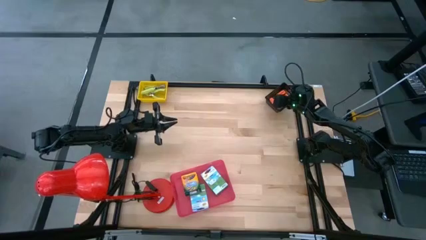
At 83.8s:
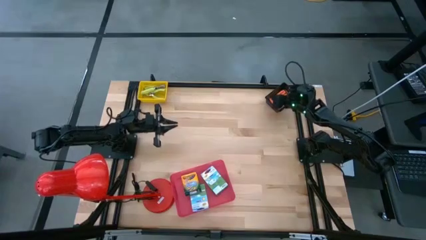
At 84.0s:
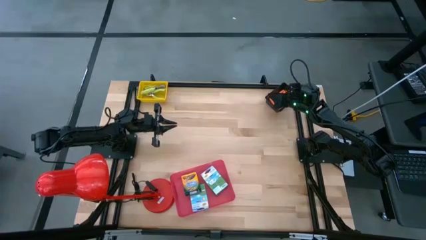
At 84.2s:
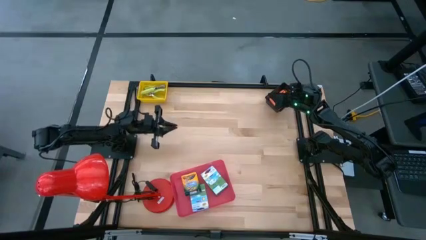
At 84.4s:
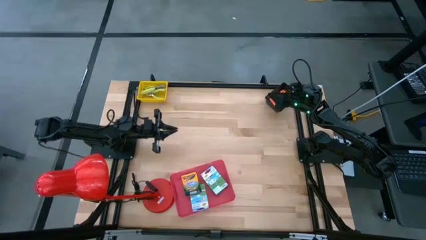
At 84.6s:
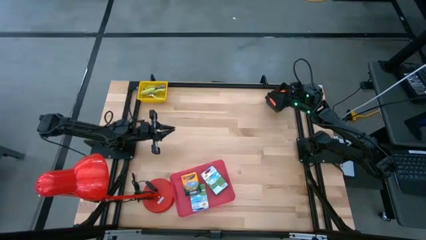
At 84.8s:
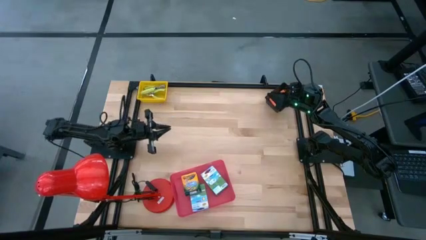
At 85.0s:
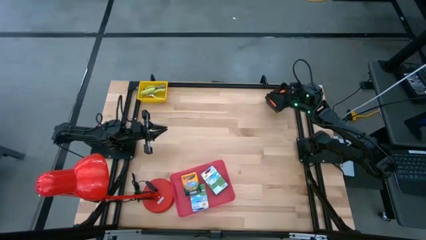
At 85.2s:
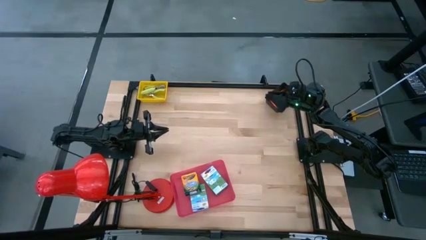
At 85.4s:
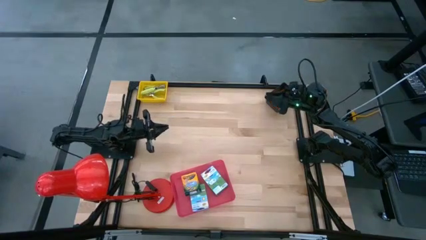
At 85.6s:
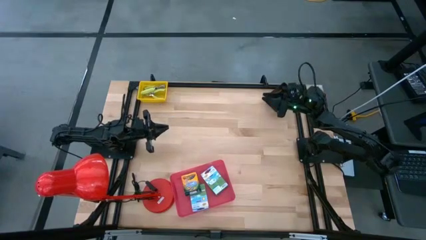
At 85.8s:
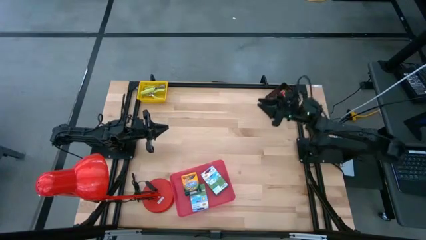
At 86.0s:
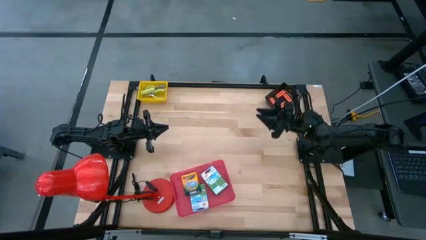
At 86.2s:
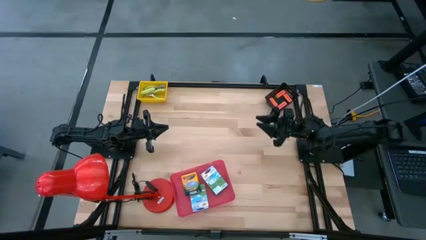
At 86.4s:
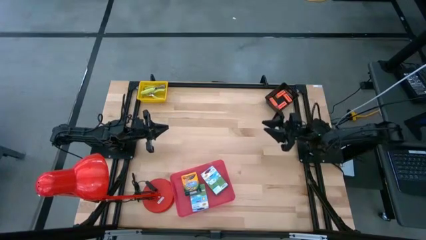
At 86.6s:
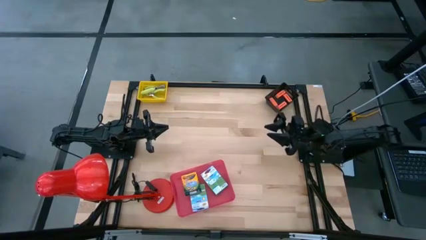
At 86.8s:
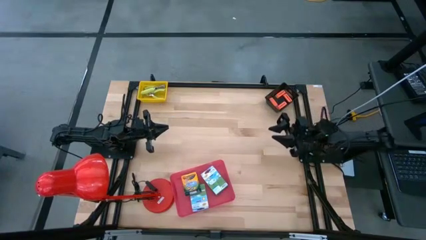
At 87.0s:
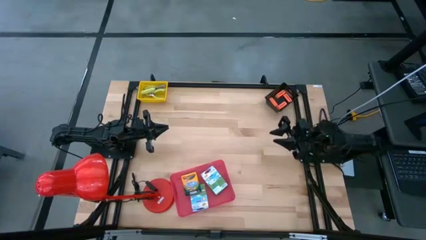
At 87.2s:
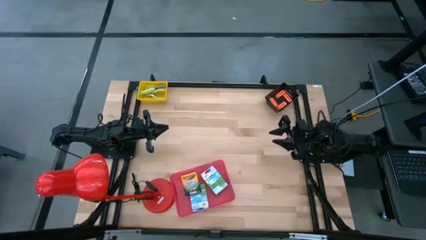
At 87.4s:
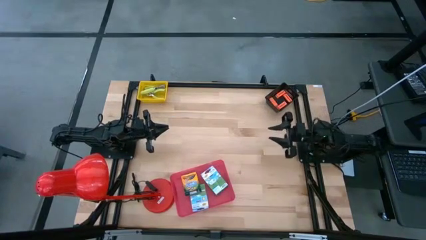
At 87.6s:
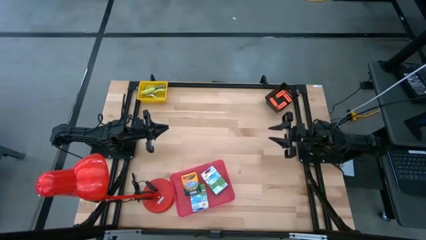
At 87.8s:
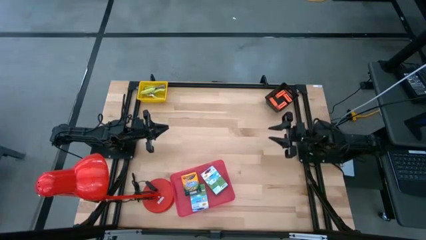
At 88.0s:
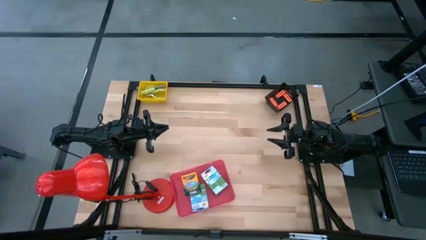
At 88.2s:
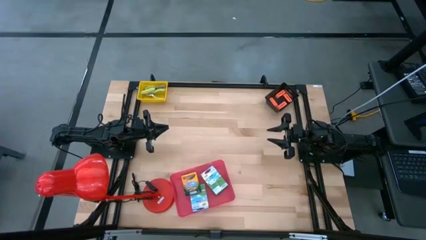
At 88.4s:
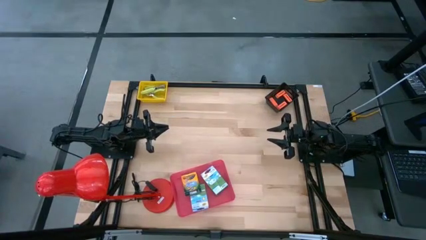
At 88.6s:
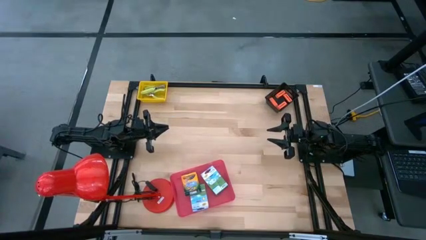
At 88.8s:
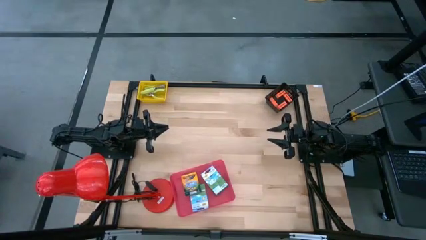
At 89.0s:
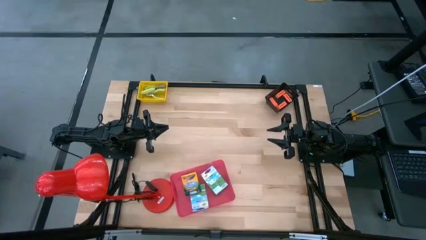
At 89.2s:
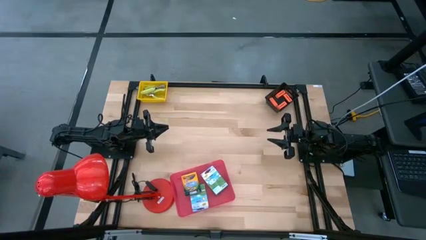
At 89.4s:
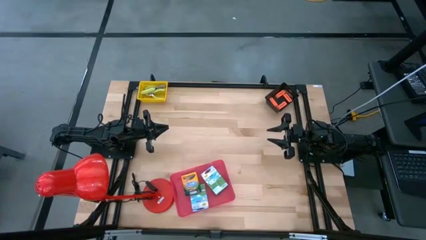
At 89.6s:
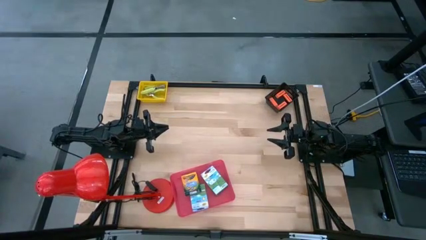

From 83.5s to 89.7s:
Task: Pick & Place School Supplies
Return to Home Position

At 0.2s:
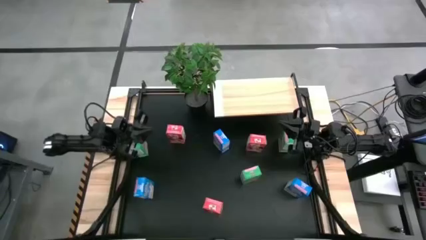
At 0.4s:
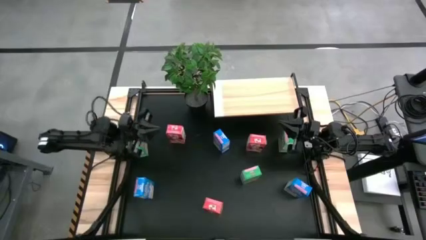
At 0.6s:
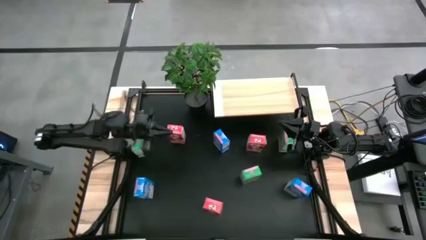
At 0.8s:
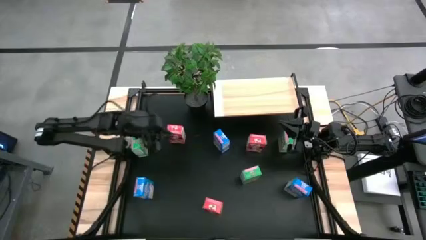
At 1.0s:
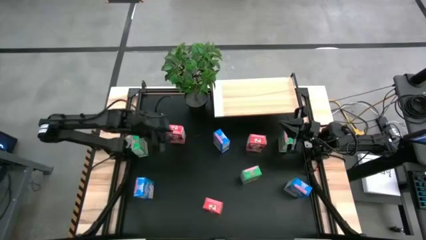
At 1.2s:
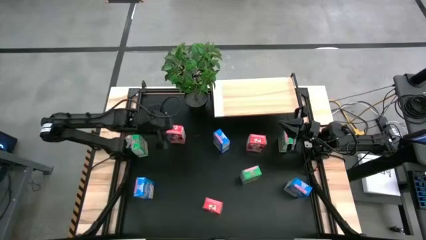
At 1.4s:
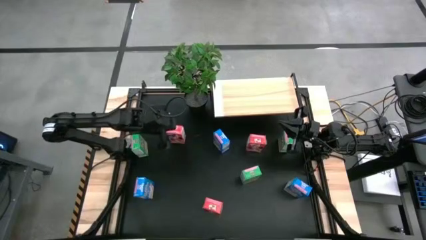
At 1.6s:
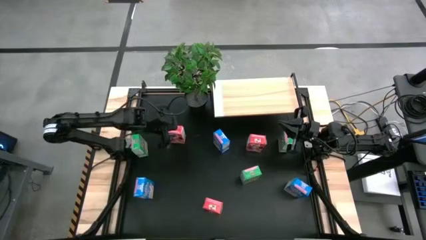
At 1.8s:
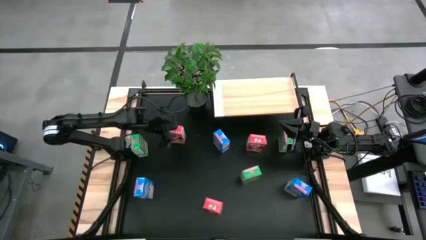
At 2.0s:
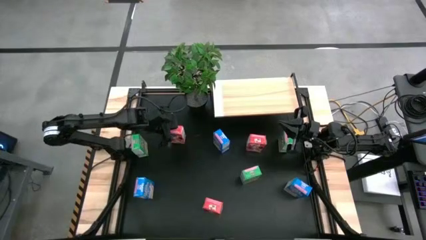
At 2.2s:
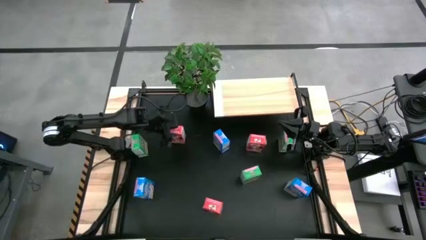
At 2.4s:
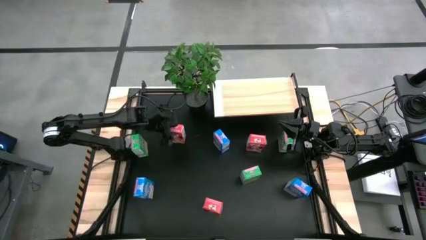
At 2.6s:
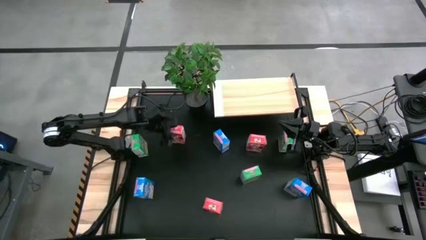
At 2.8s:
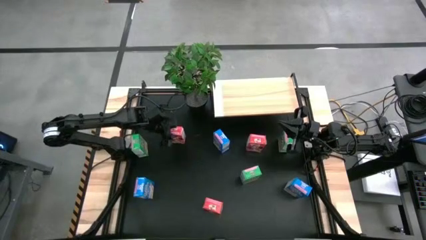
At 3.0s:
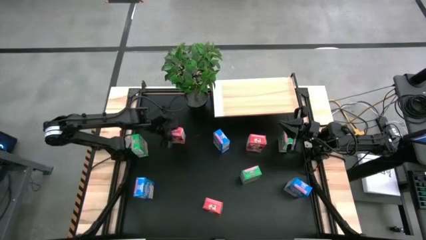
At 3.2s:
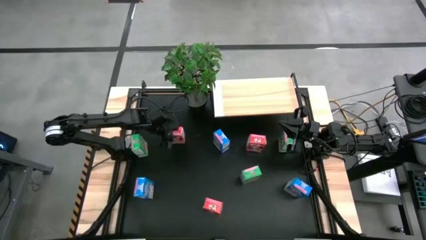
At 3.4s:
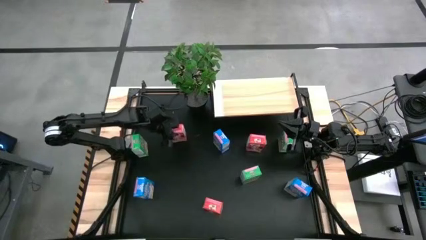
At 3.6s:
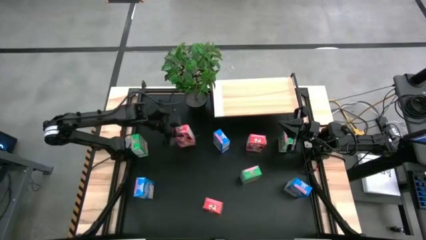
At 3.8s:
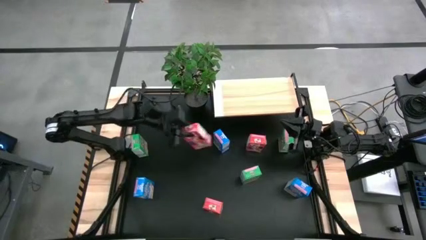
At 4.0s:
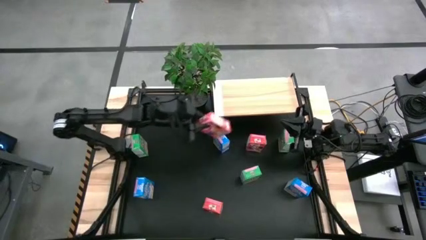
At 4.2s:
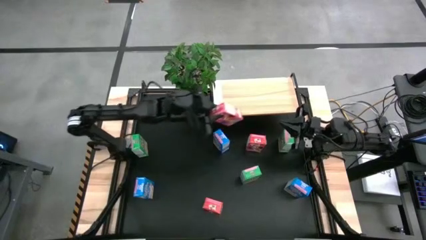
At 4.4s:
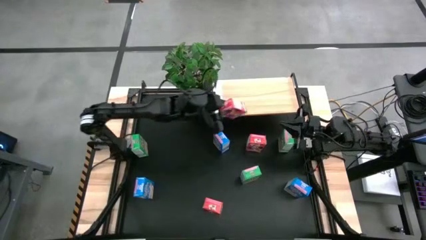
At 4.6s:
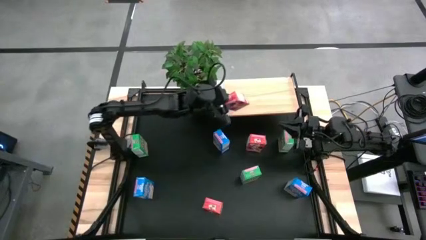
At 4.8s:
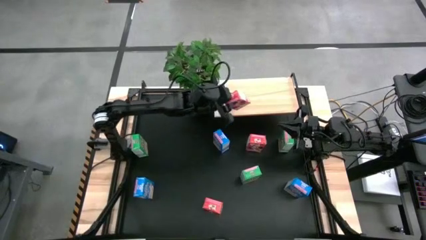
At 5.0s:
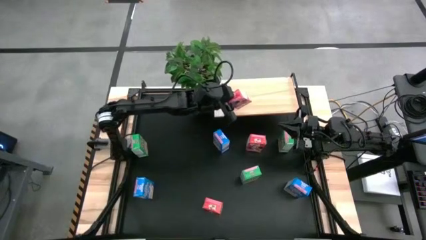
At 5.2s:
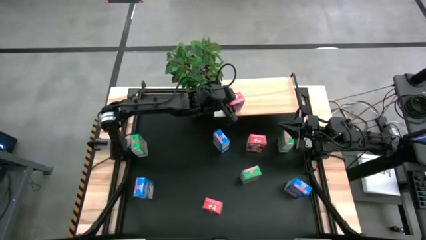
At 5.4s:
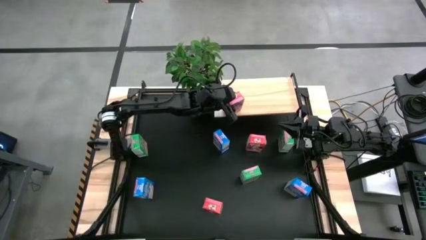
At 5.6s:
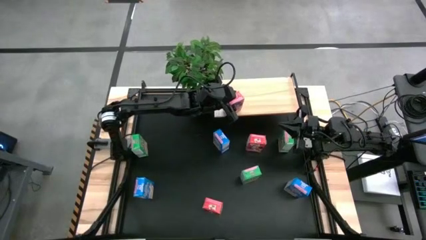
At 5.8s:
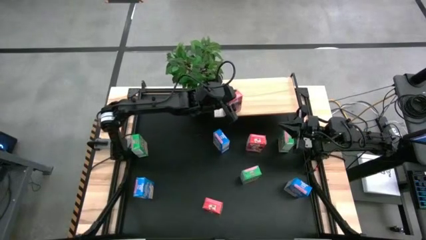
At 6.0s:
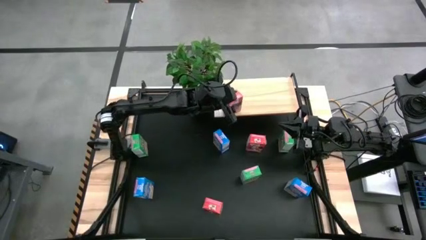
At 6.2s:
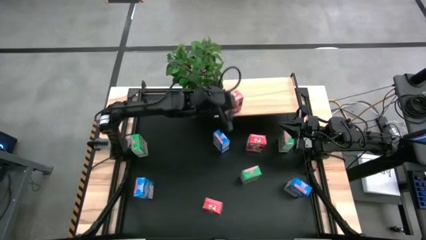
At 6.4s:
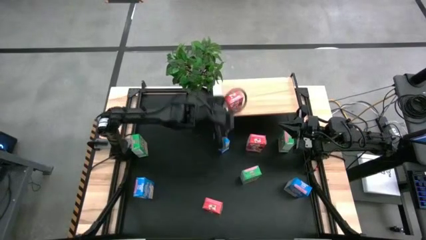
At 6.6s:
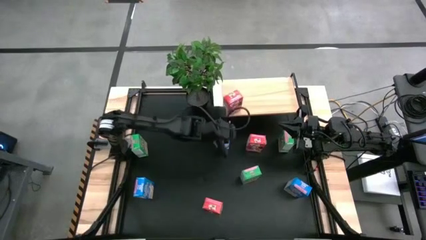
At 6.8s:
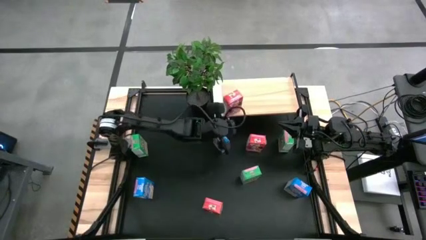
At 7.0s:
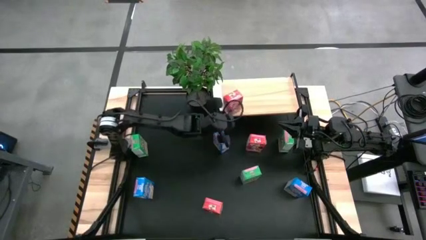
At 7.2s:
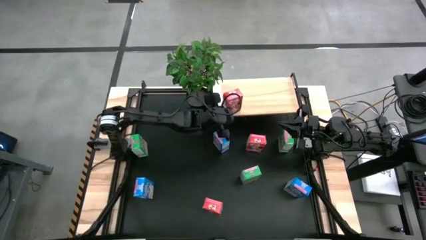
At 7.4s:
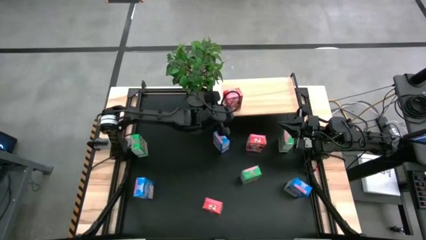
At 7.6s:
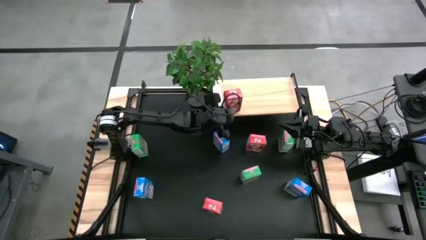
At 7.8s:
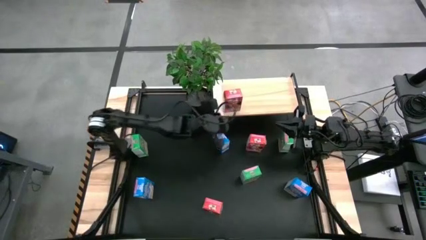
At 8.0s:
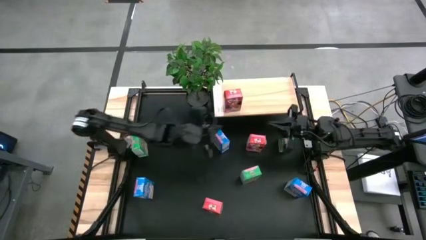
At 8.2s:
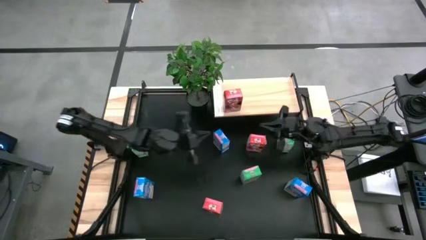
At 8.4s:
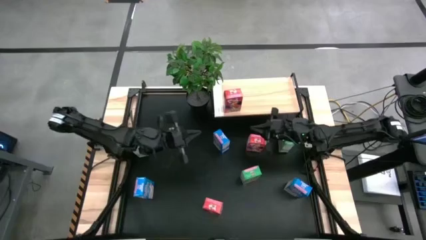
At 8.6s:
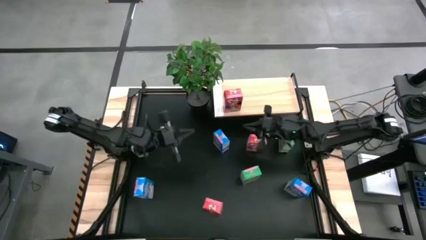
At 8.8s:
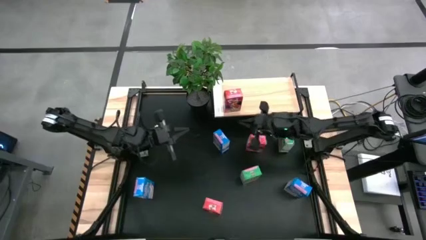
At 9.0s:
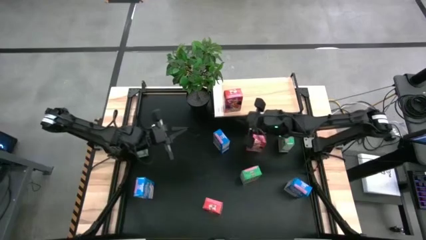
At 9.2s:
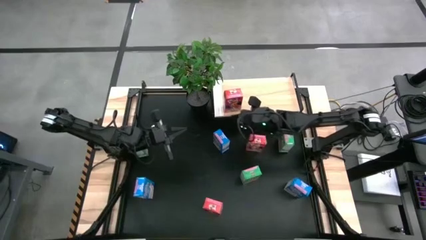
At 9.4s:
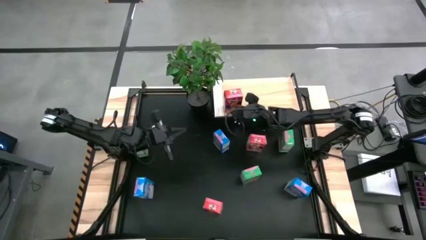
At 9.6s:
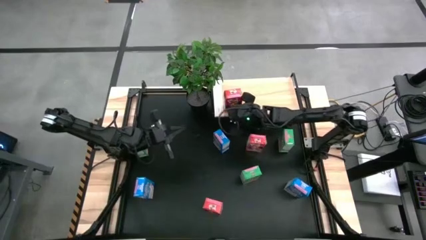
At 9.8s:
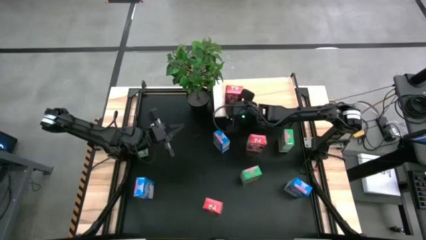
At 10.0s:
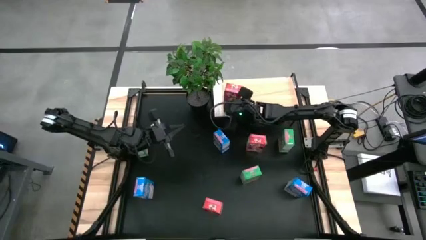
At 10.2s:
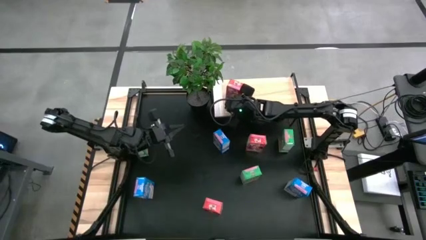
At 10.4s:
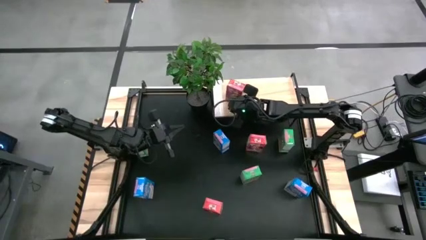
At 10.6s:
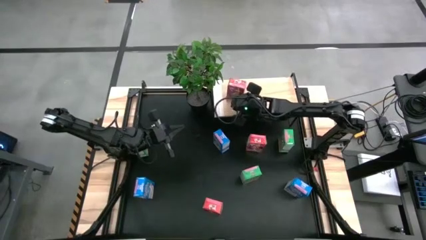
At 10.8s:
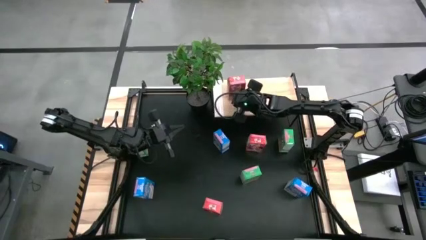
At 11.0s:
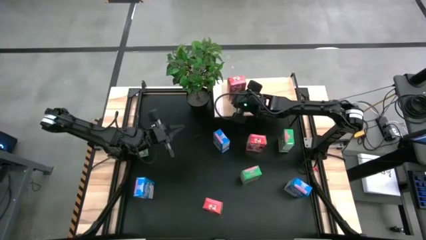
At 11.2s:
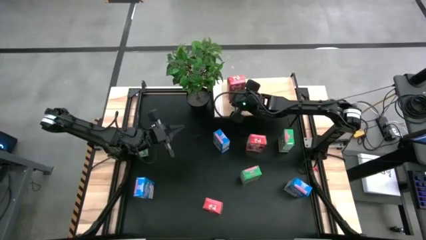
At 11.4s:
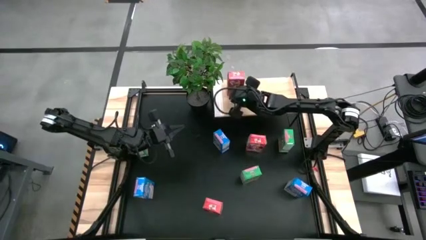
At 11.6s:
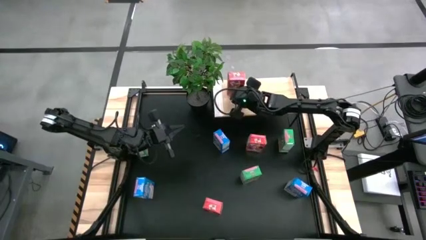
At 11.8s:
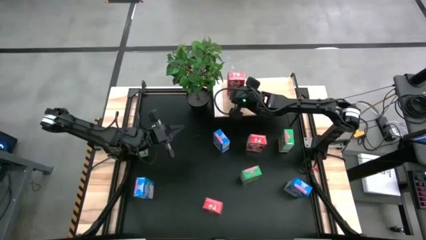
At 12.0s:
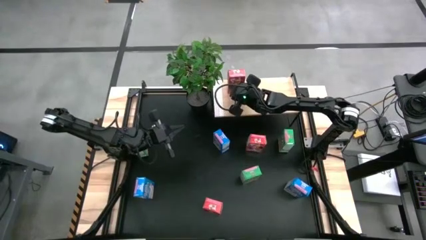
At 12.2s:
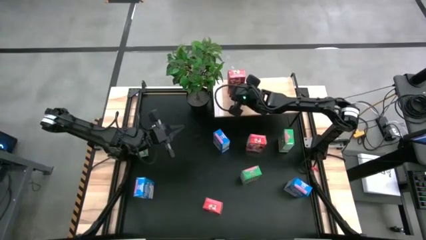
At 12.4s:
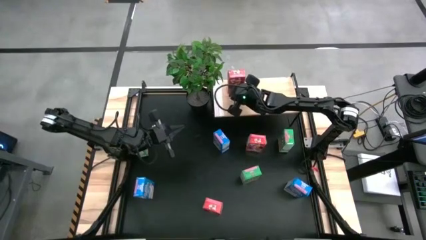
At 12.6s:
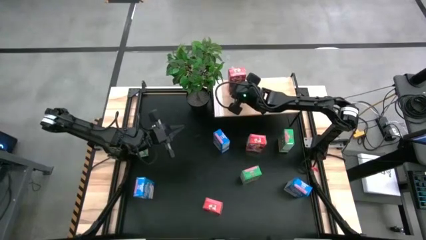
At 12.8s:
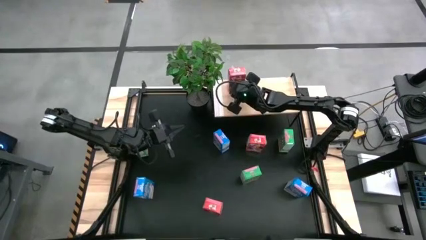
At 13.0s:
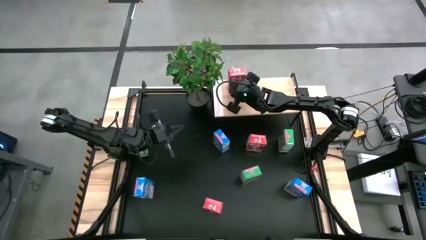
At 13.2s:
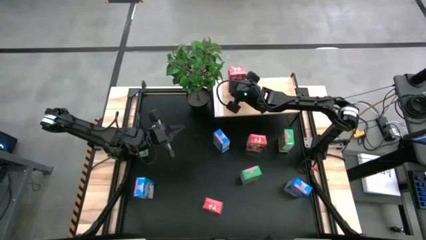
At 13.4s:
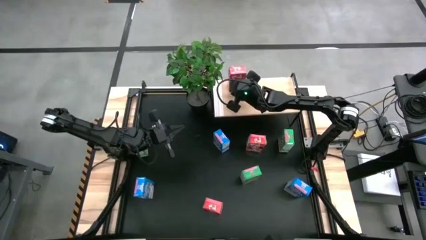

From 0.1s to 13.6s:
Task: Stack cereal on shelf
Put the top left red cereal box on the shelf
